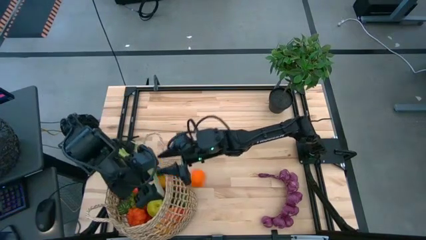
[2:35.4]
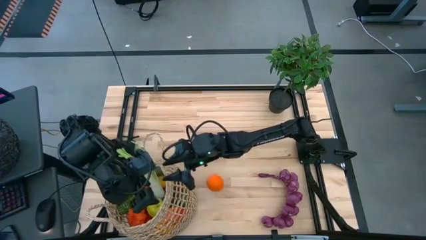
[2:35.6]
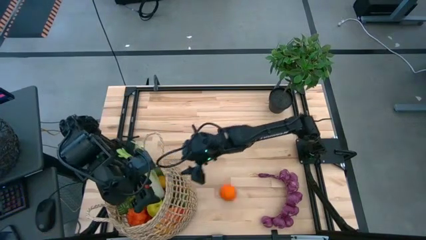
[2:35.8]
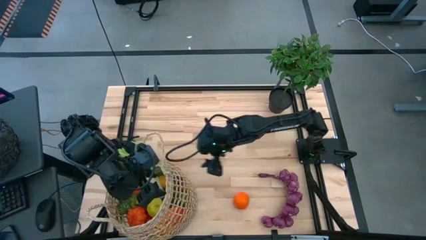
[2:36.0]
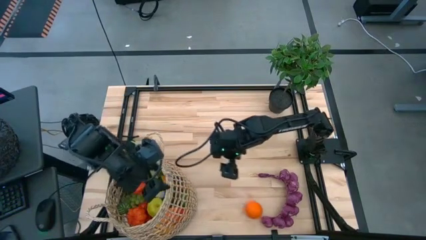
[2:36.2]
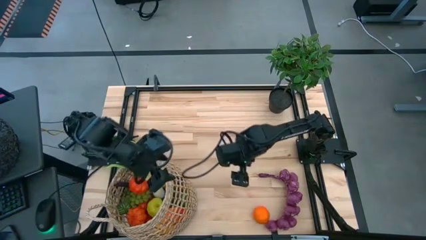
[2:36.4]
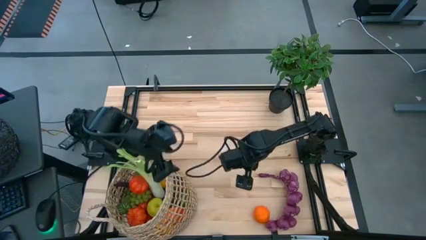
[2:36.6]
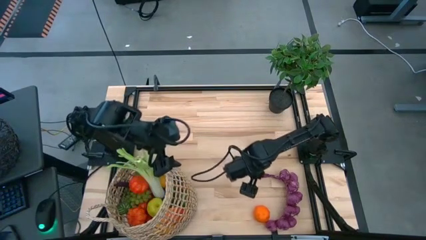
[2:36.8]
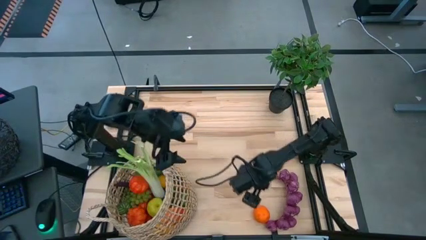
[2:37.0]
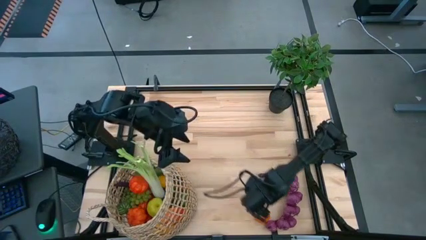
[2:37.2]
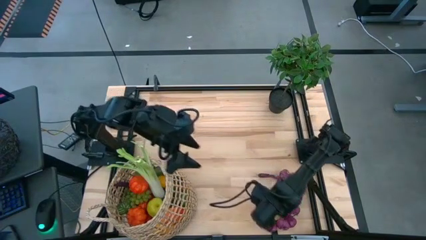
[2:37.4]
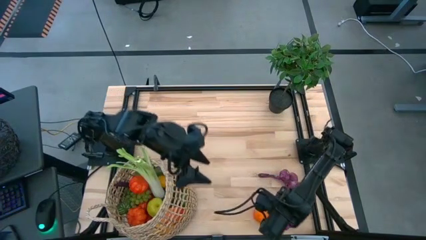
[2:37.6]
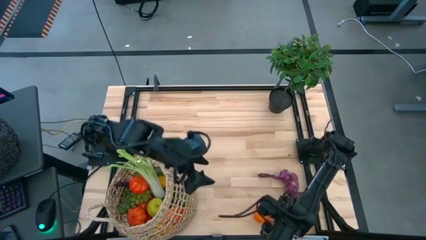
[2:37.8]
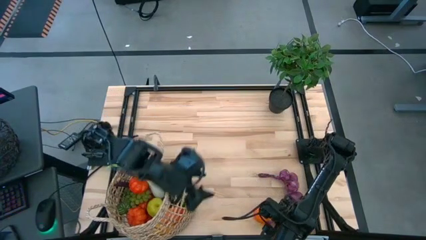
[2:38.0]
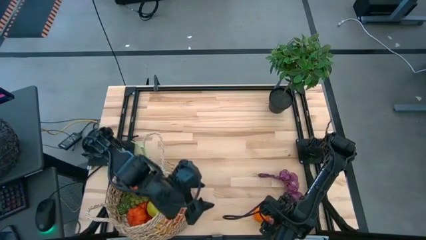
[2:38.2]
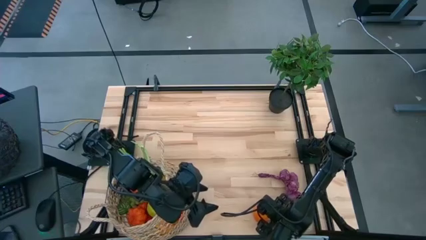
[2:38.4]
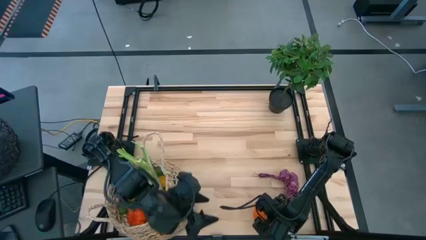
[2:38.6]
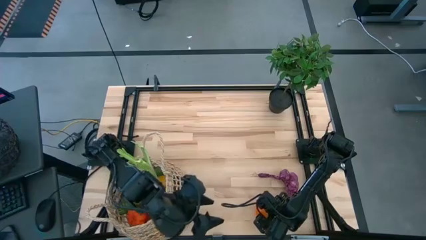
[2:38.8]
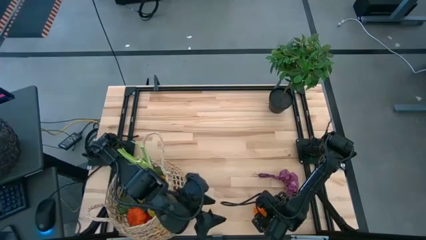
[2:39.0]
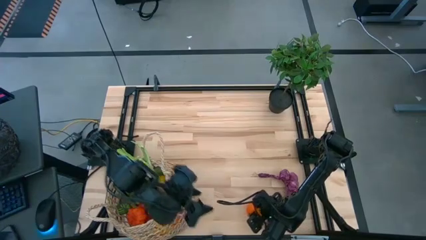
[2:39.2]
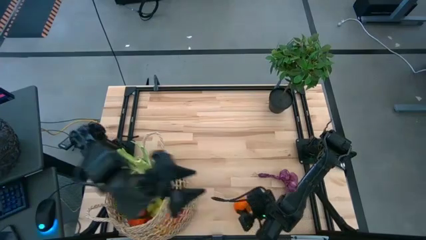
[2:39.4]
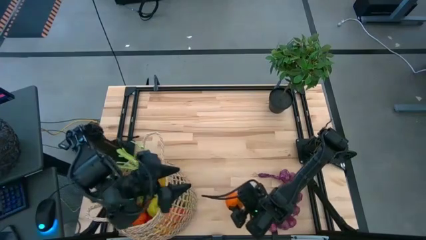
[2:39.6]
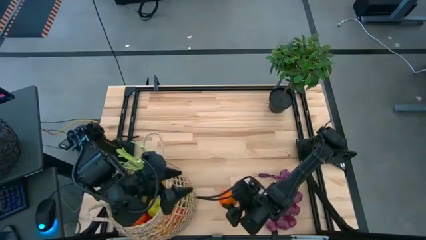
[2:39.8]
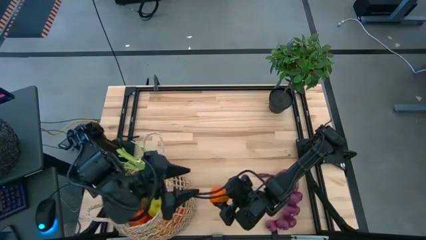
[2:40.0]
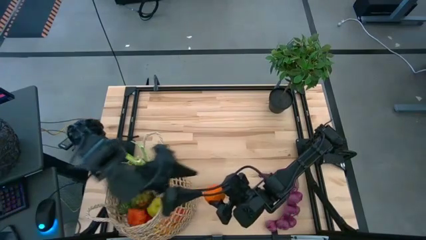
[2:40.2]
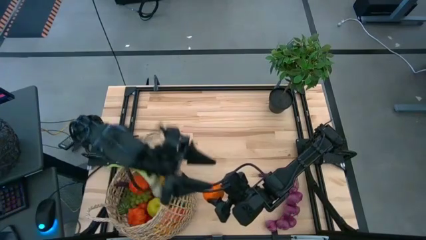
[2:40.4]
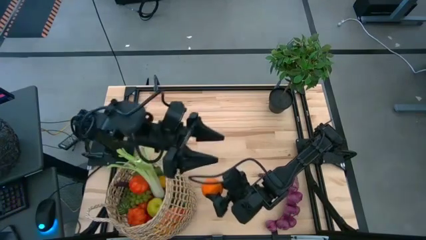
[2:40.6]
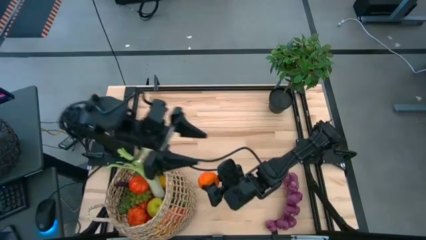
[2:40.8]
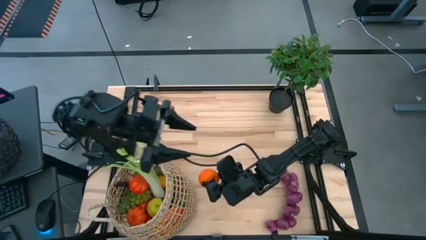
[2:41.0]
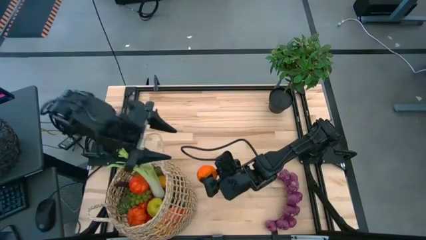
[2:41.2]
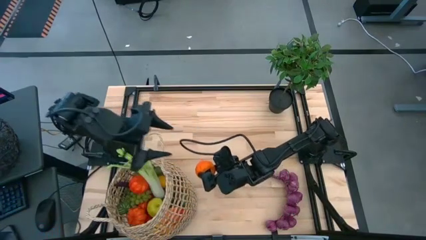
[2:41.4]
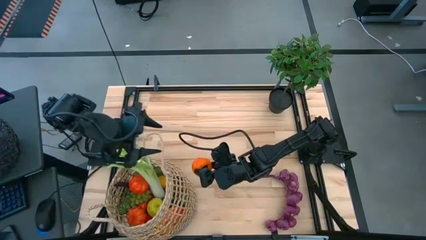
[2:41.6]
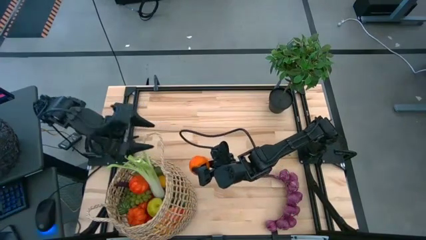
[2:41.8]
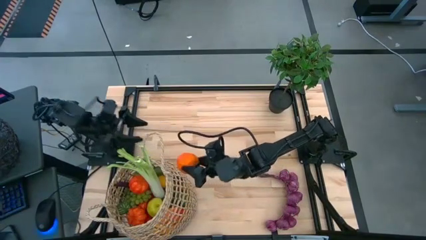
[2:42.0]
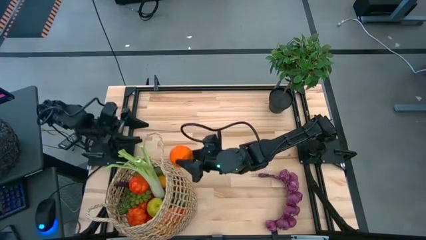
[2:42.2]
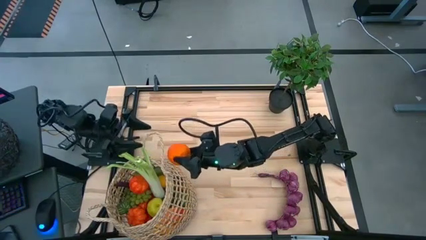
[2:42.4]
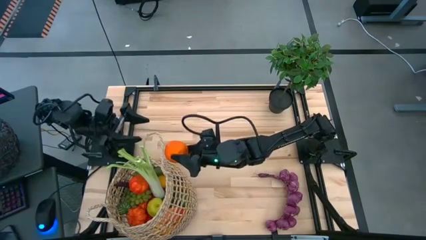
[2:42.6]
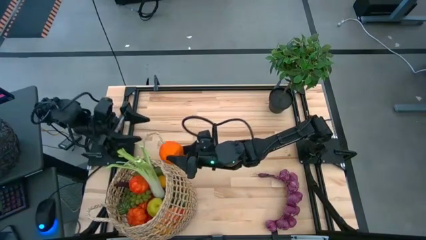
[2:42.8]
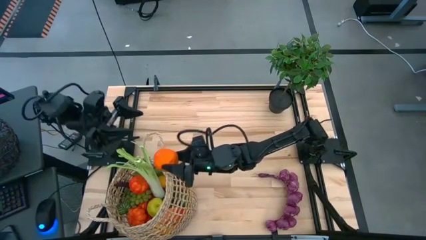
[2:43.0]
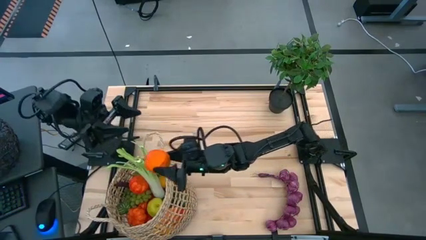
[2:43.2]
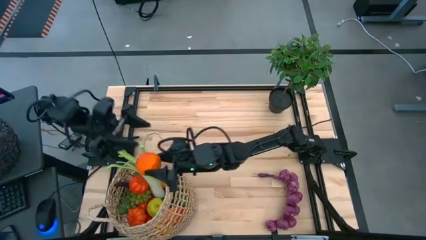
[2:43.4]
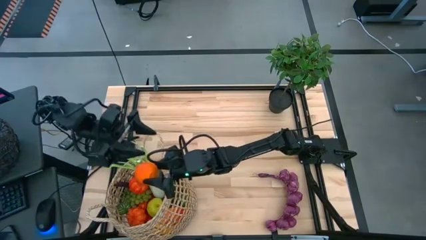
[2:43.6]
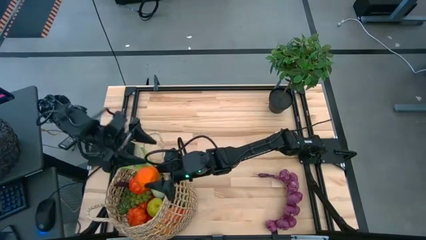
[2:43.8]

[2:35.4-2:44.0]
Task: Build produce basket
Put the orange into the basket

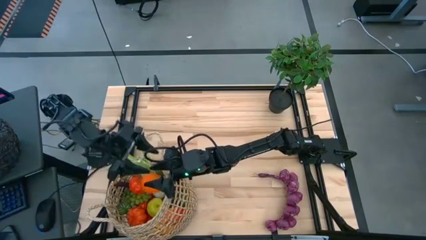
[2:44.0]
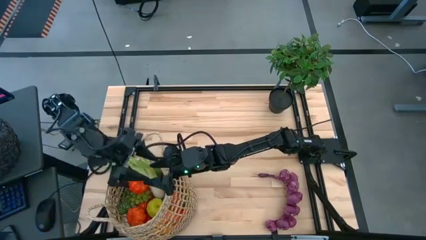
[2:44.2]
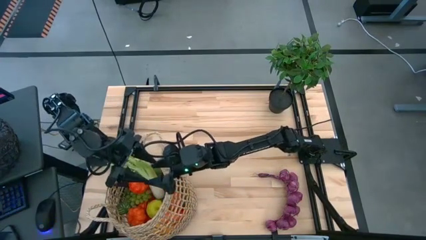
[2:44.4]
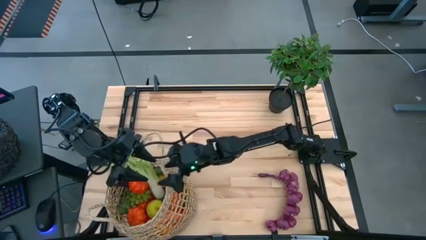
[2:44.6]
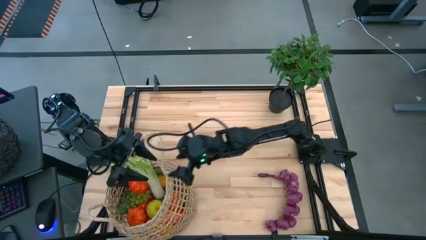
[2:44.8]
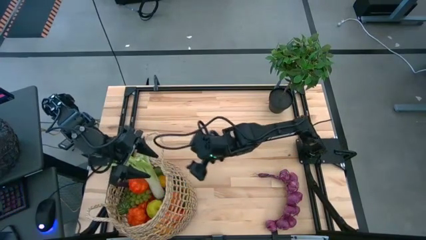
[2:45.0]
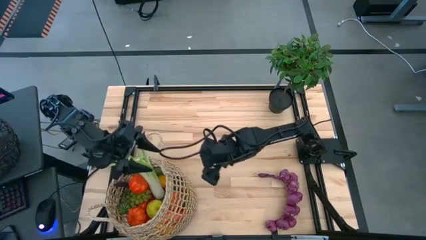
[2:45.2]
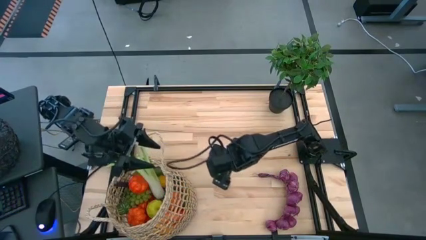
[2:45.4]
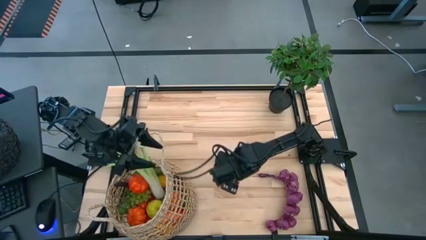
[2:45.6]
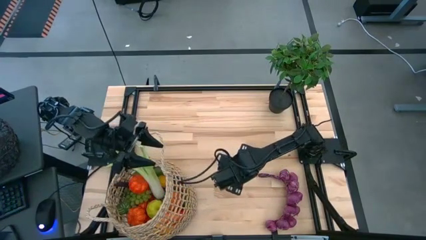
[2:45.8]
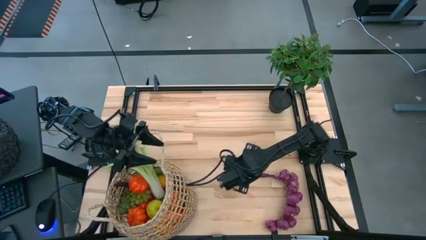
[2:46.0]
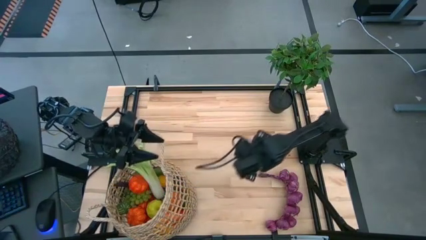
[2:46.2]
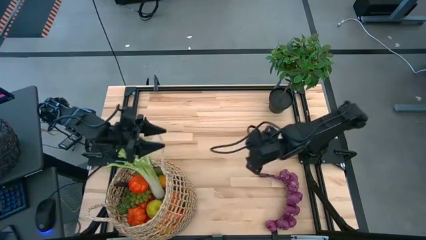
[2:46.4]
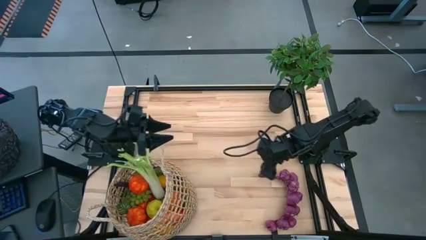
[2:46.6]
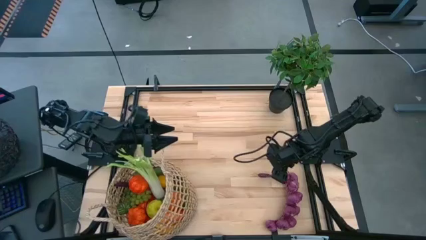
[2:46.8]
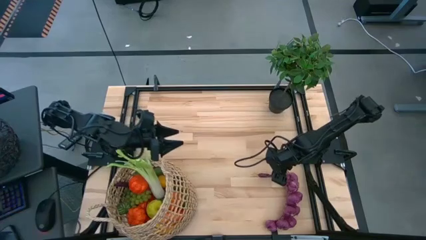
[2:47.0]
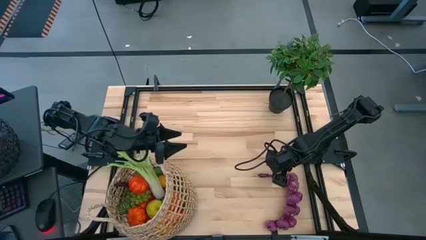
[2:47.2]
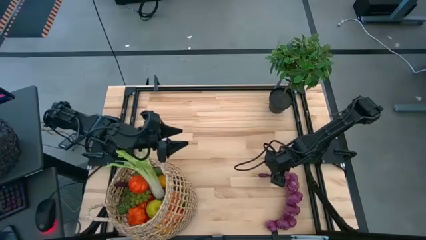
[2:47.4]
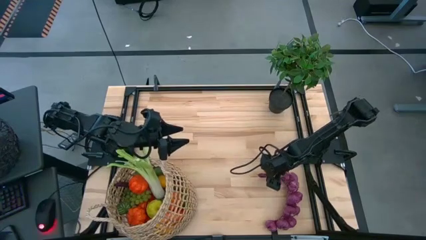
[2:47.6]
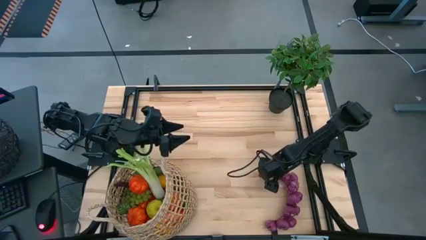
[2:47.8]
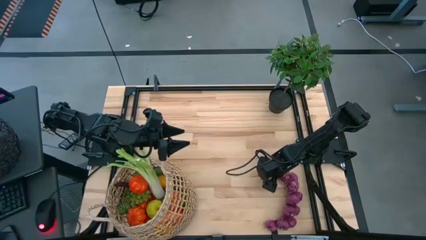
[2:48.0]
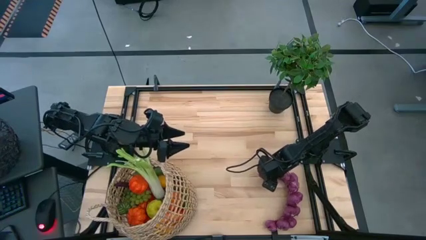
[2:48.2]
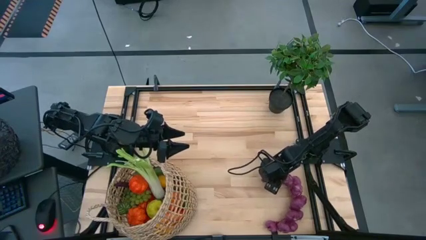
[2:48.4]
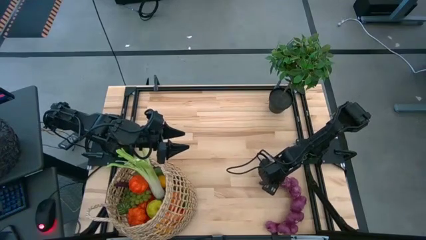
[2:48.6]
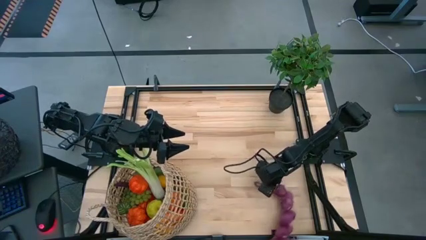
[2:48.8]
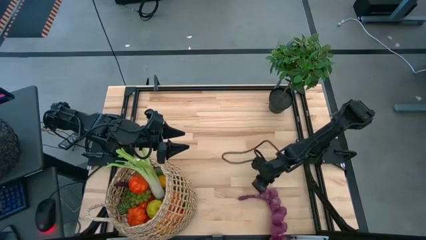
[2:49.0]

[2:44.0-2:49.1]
Put the purple garlic into the basket

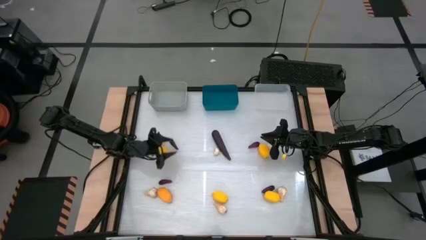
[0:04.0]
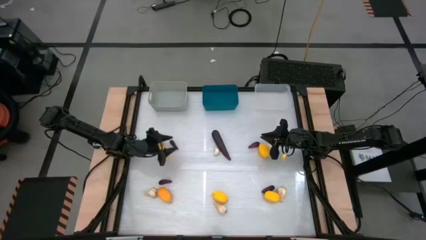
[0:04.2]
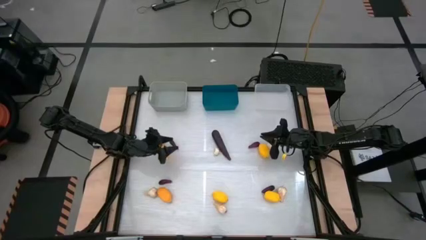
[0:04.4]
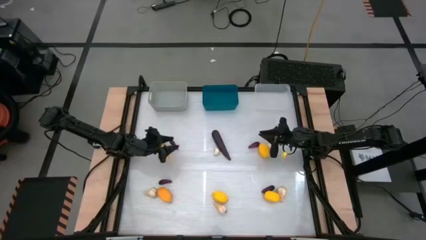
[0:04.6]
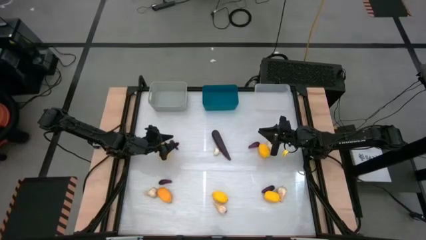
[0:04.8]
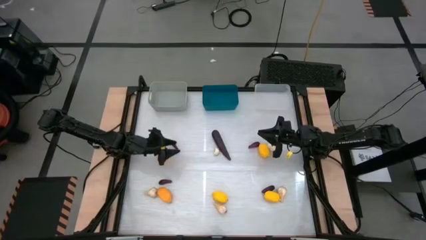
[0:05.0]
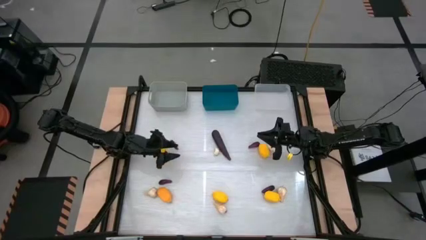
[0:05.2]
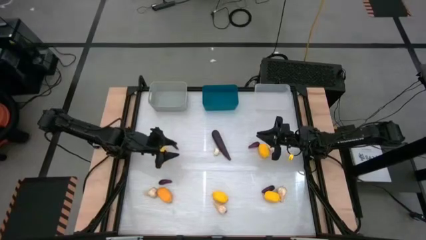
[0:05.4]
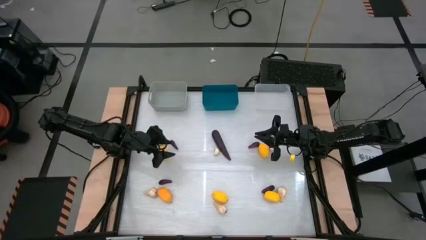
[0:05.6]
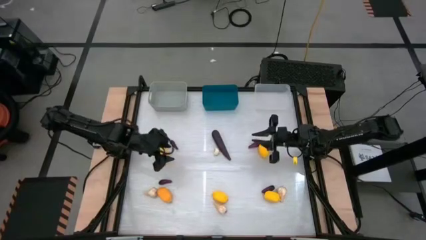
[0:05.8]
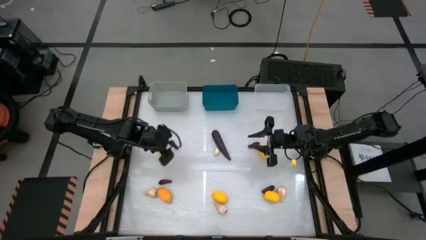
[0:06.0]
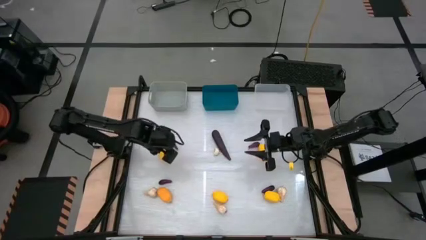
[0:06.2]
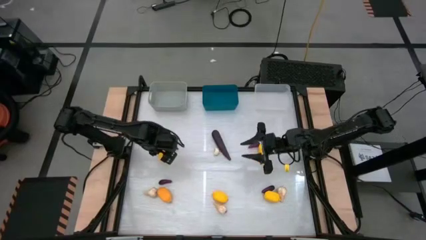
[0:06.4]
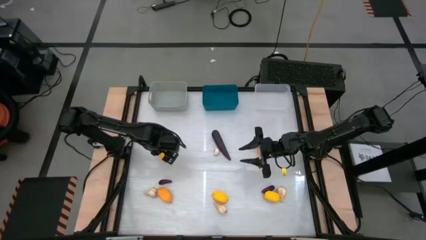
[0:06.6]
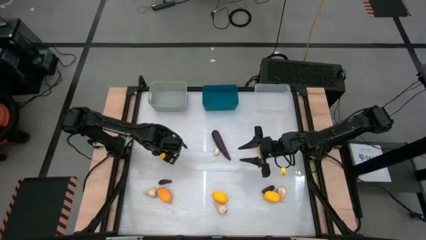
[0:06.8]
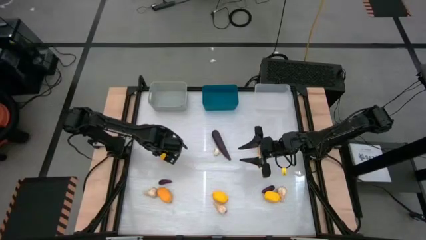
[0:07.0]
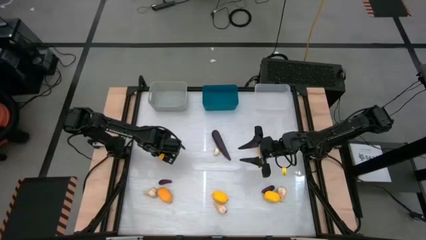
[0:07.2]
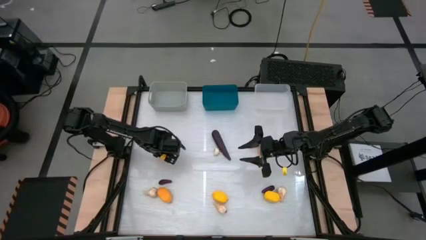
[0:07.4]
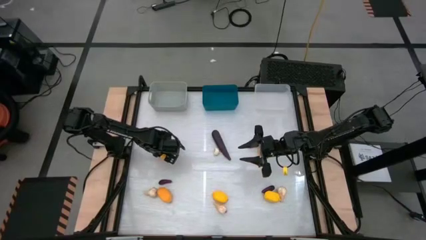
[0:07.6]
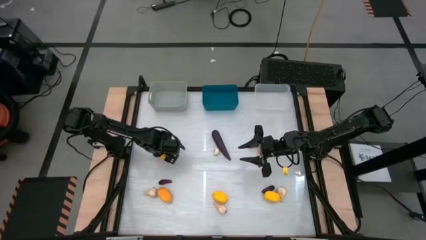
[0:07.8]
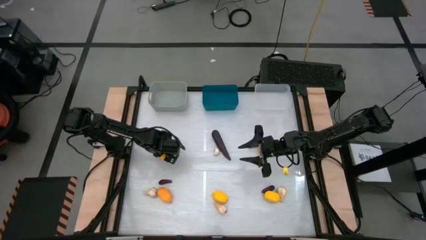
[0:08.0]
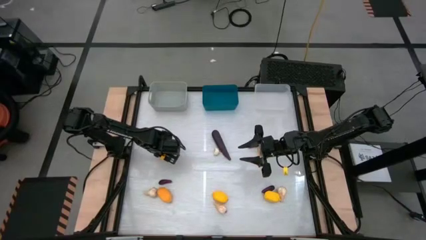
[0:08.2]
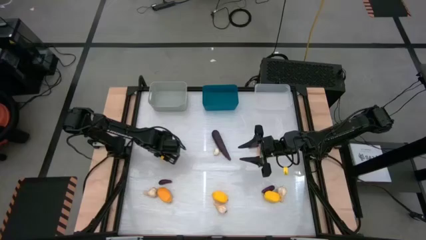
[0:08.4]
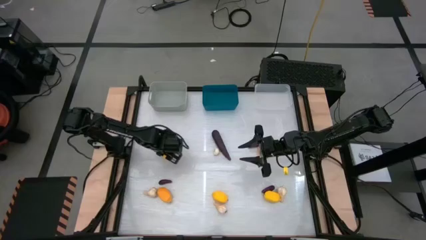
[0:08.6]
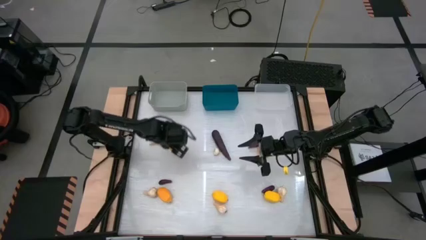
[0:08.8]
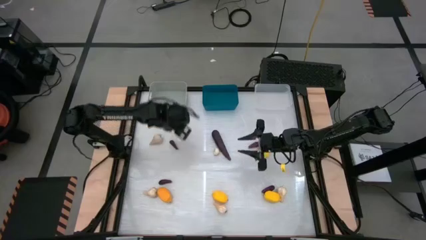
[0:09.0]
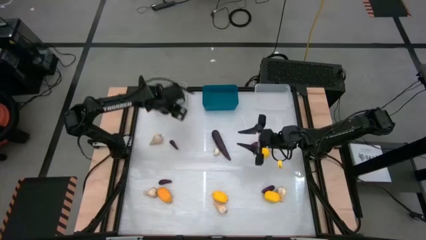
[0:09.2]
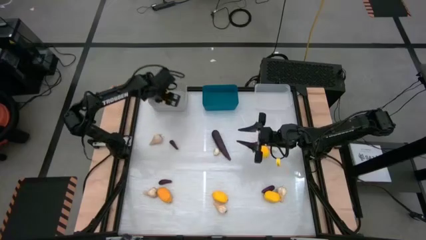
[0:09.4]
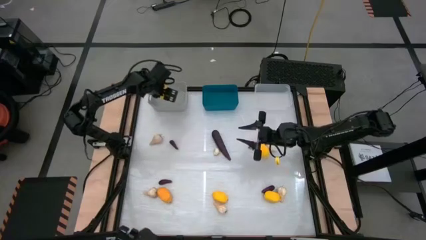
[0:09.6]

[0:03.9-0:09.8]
Task: Sort produce into baskets
Put the top left lemon into the gray bin
